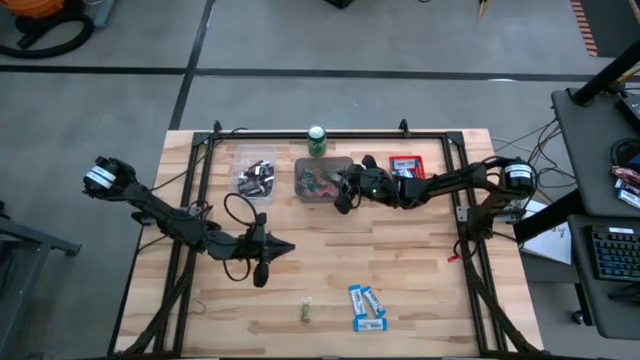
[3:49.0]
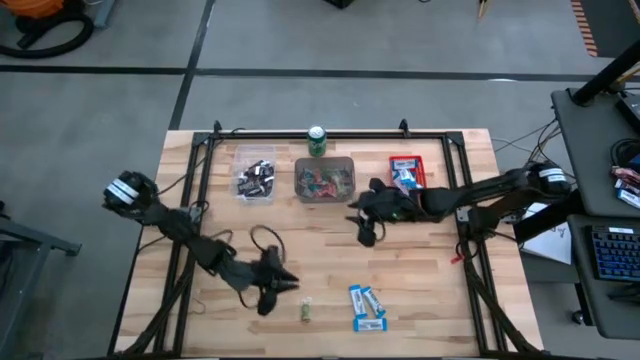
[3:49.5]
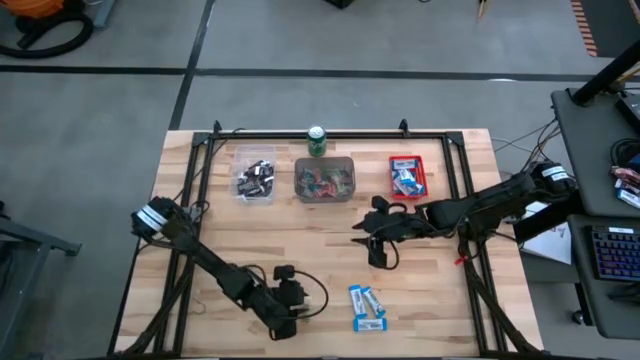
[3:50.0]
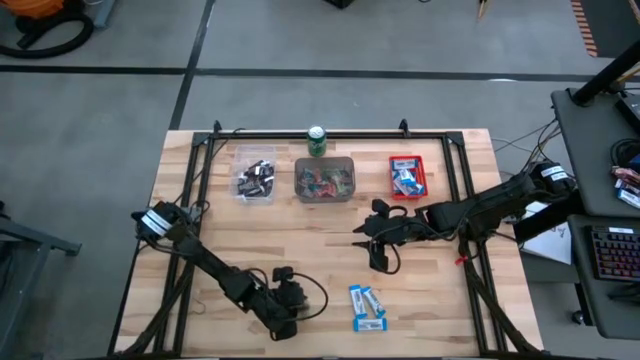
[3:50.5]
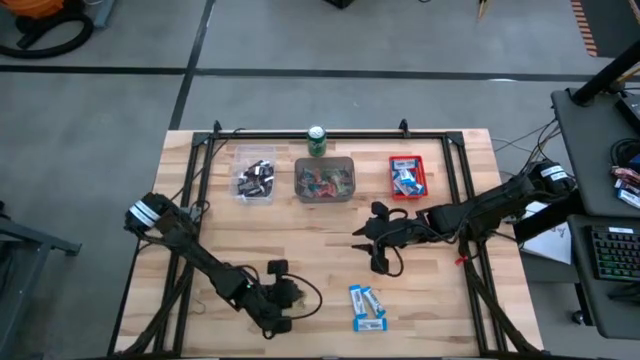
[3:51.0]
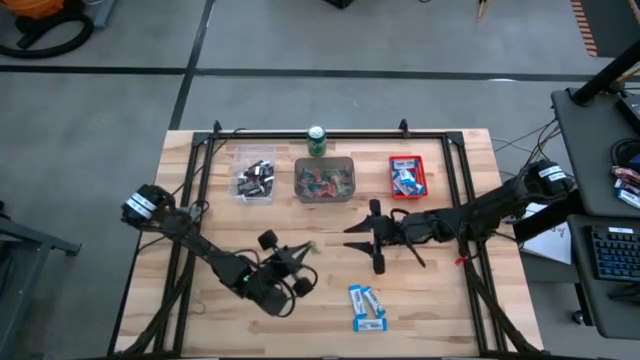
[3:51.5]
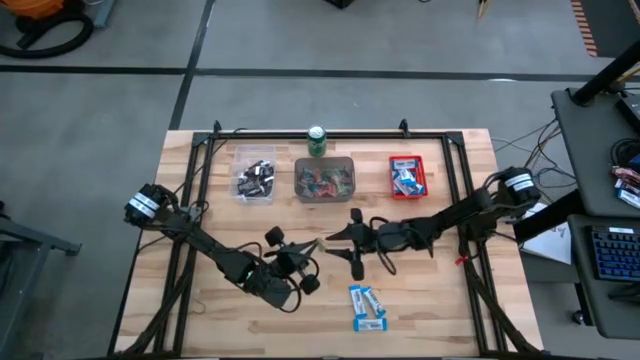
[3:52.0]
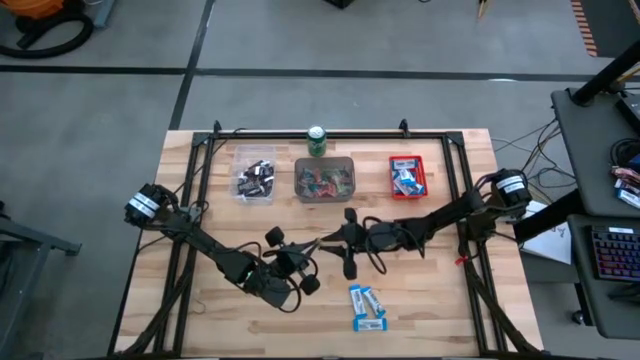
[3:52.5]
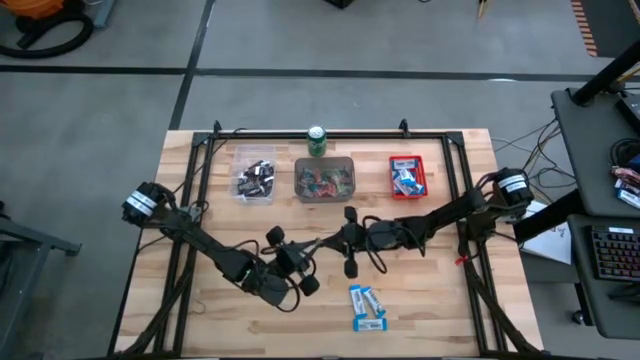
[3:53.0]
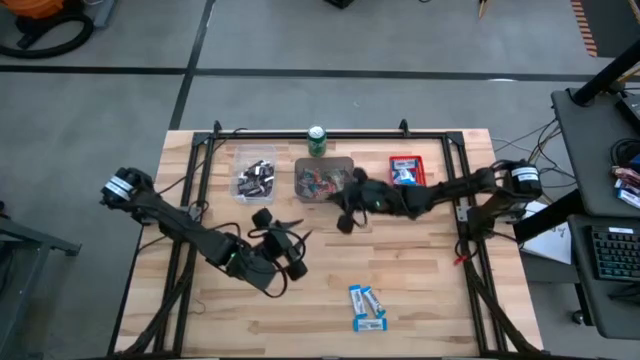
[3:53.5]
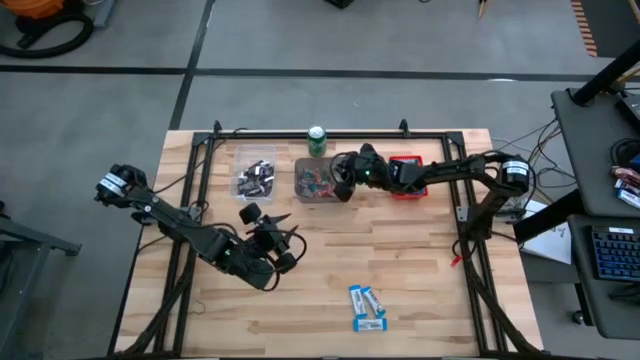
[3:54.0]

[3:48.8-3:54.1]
Task: Organize candy in baskets
Put the green gummy into the black bin

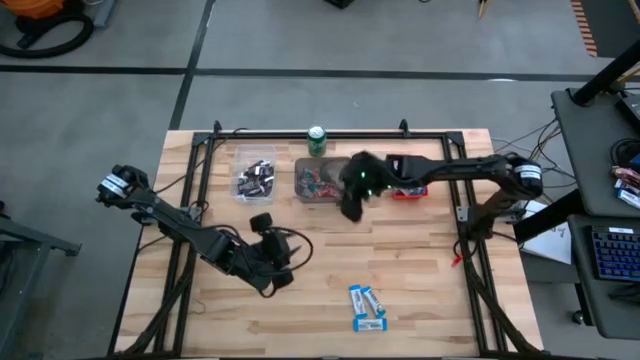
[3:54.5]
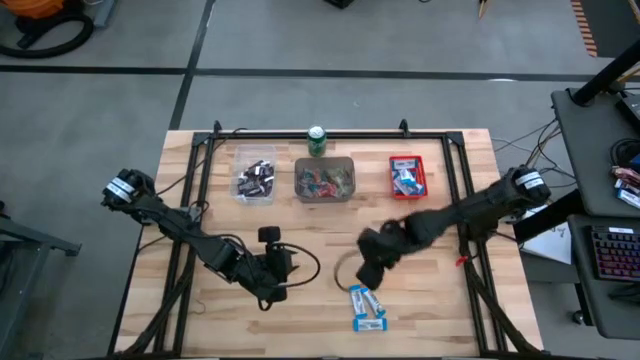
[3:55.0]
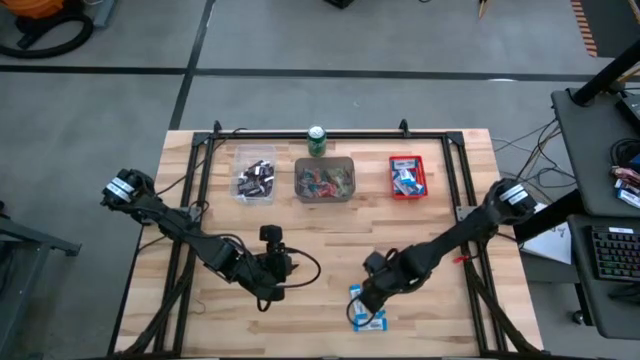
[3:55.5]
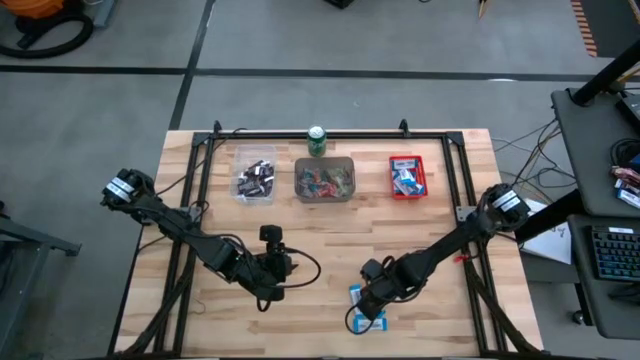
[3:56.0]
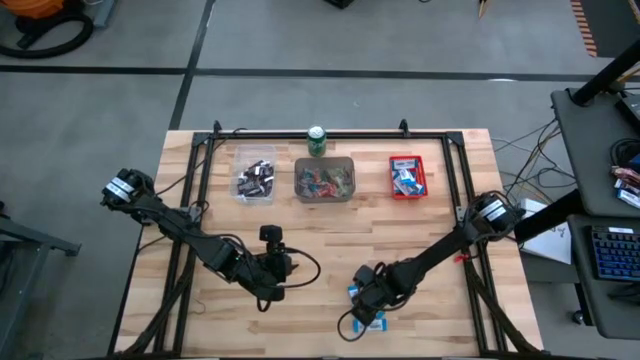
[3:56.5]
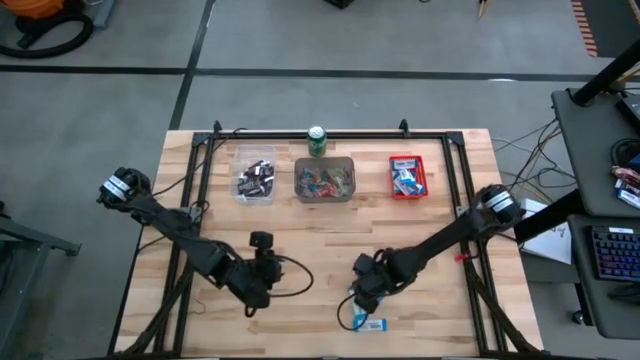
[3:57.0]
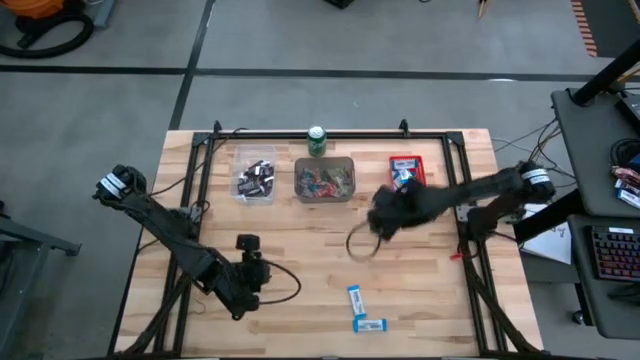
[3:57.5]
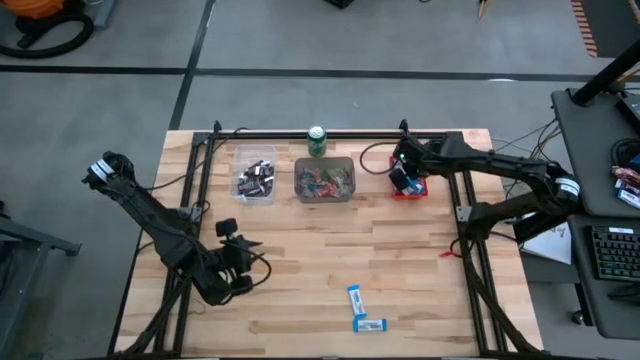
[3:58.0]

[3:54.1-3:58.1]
Put the white chocolate bar into the red bin

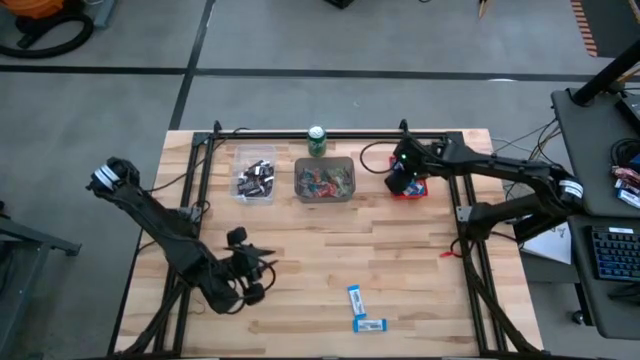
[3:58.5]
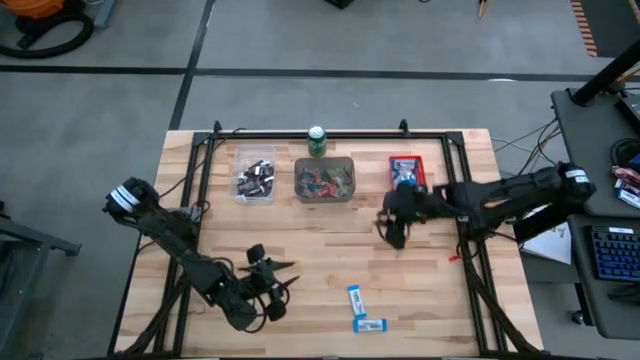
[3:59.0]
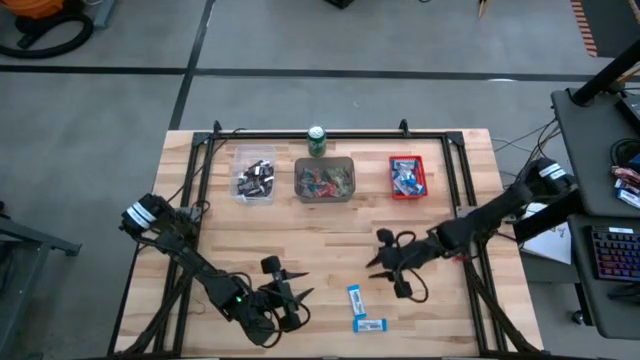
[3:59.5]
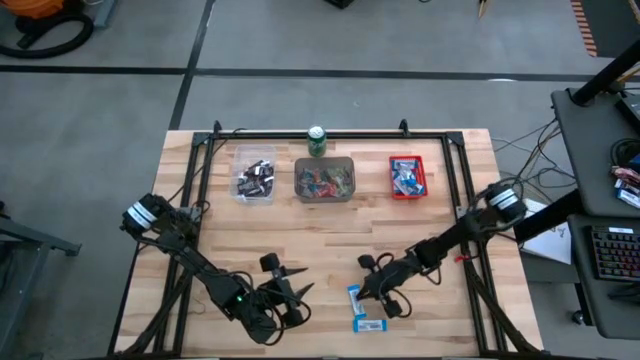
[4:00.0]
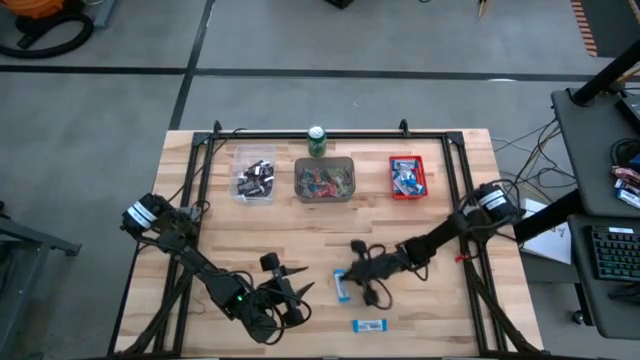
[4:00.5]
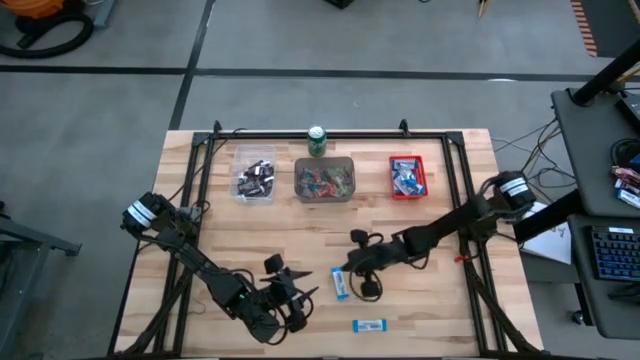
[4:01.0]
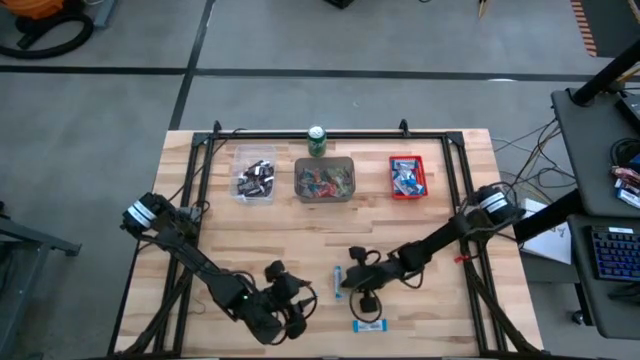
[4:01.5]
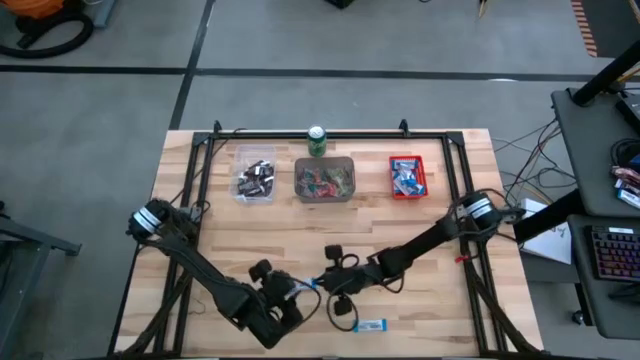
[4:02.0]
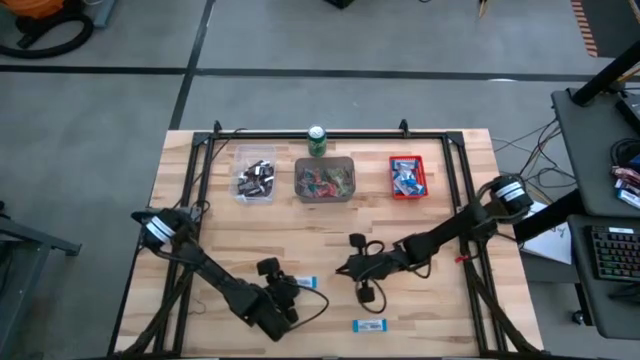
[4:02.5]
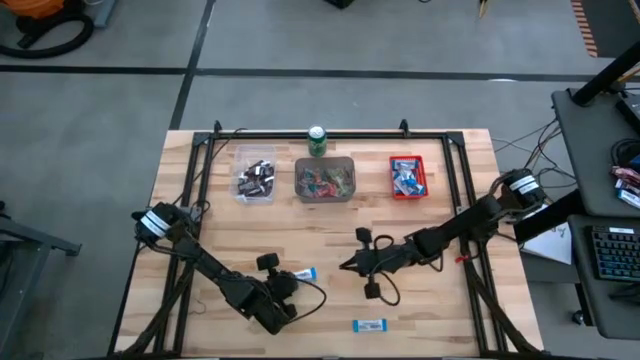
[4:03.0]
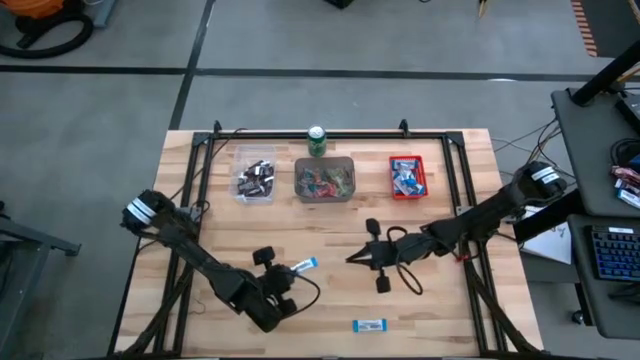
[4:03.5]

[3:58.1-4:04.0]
Put the white chocolate bar into the red bin

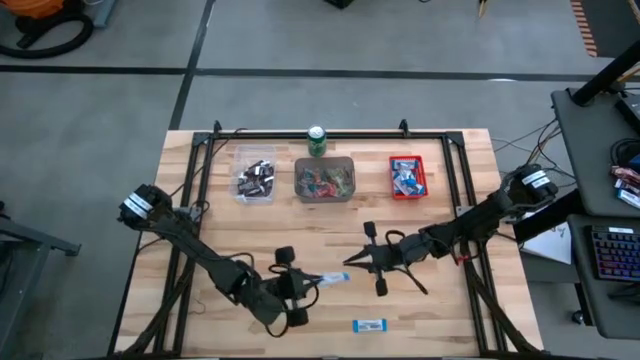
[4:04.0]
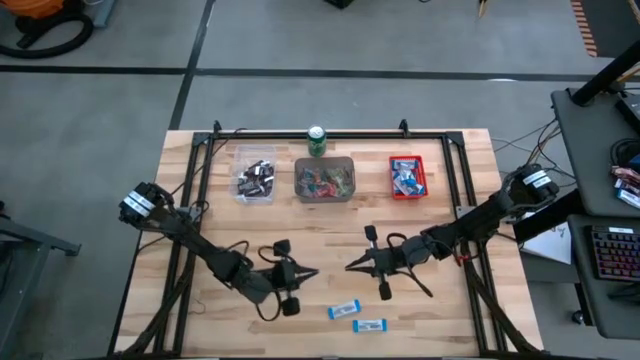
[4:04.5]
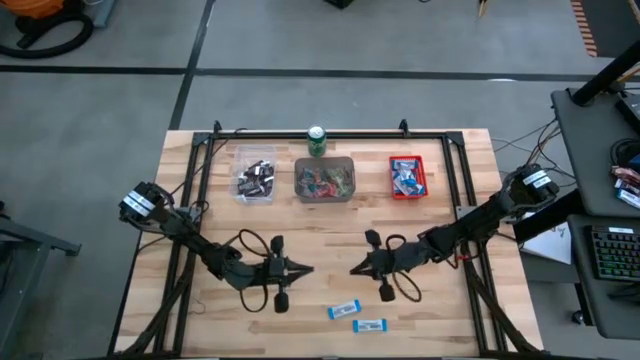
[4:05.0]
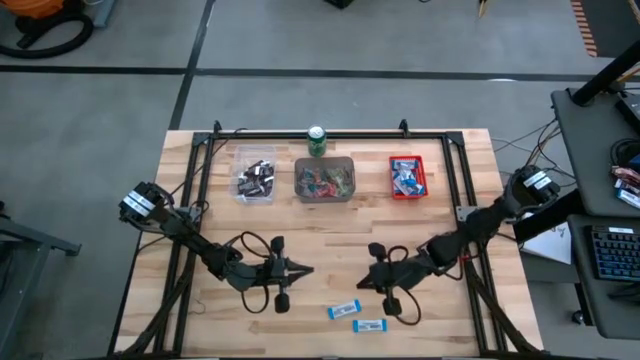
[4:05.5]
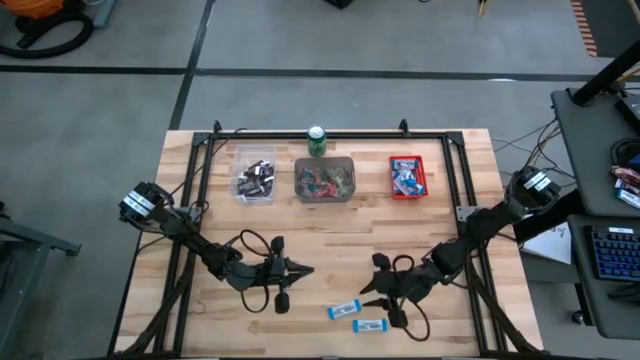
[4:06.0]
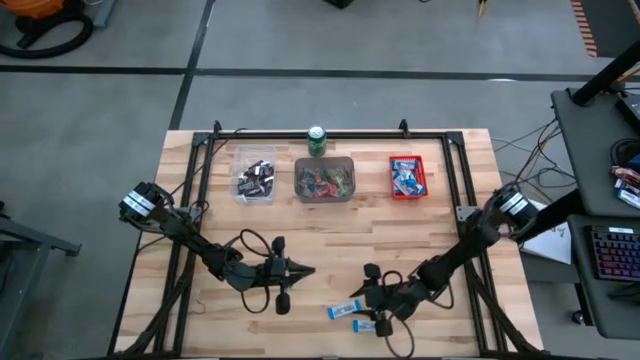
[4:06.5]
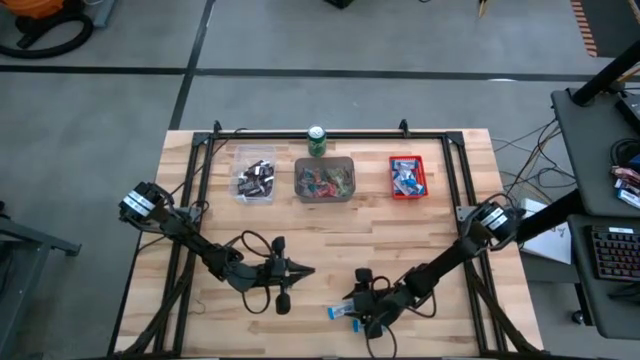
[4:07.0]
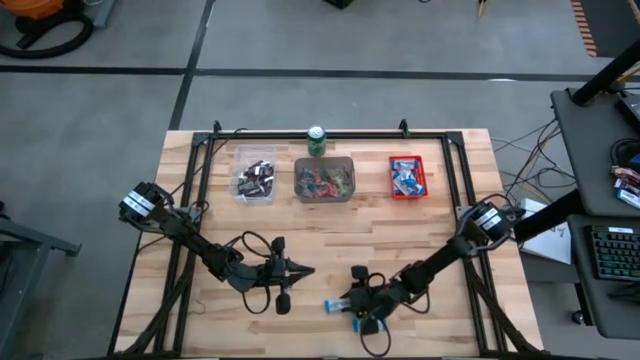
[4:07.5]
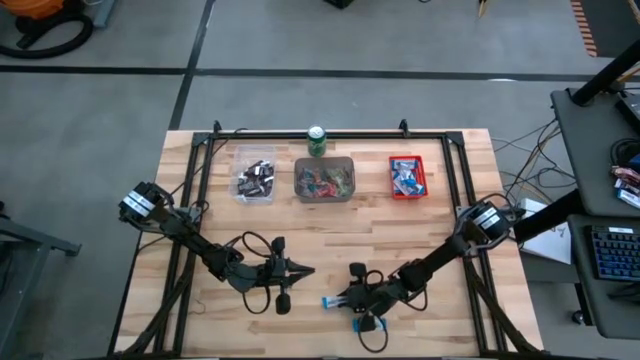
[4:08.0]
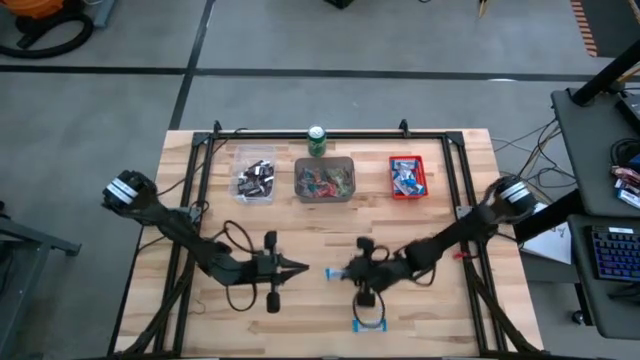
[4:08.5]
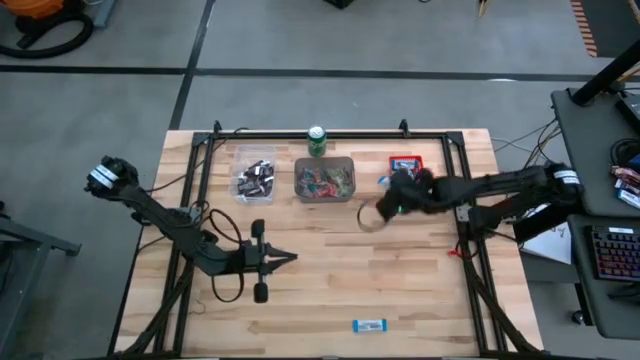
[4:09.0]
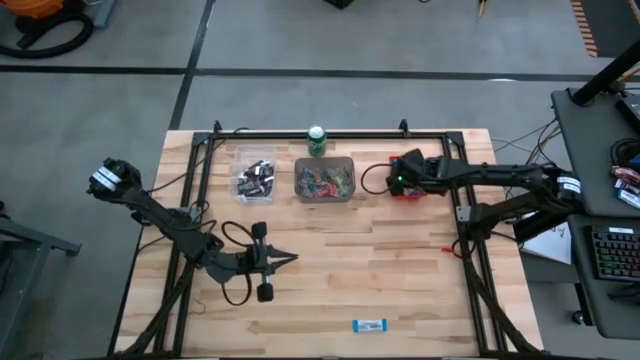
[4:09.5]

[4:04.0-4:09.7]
Put the white chocolate bar into the red bin
